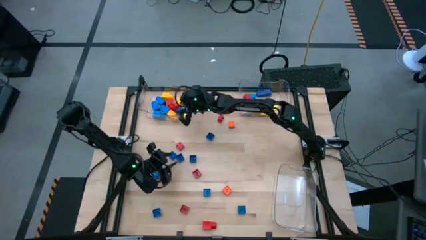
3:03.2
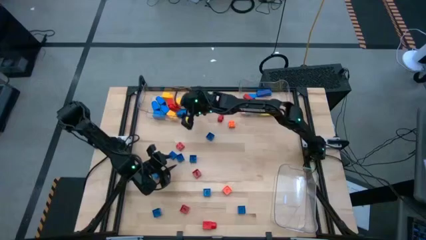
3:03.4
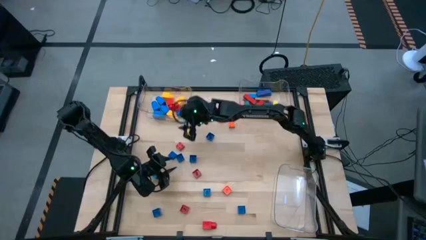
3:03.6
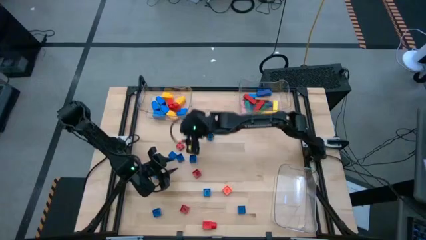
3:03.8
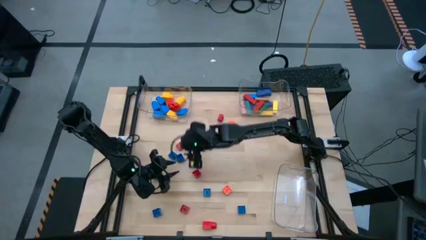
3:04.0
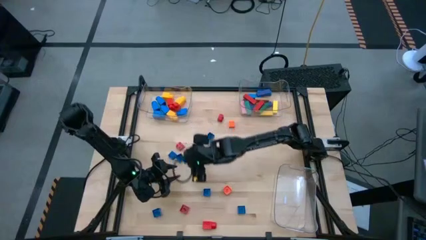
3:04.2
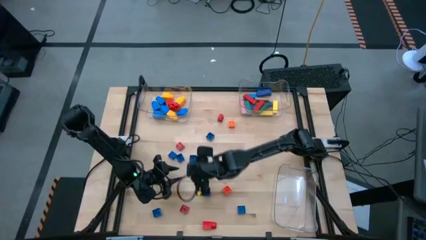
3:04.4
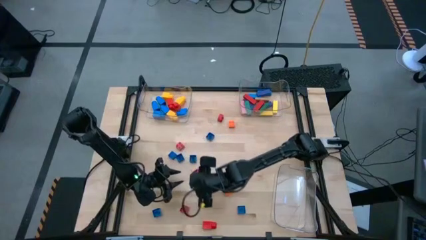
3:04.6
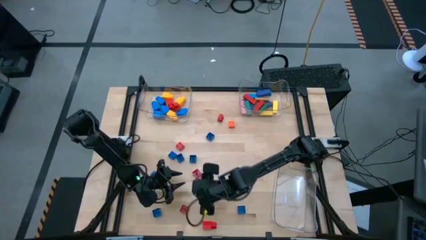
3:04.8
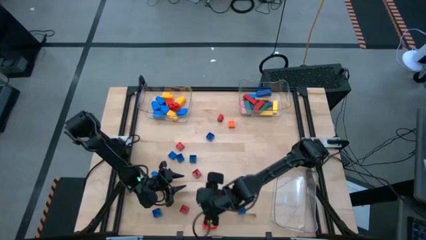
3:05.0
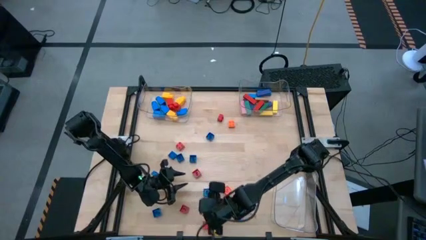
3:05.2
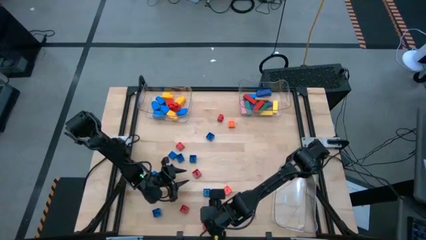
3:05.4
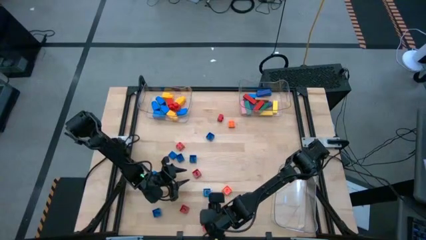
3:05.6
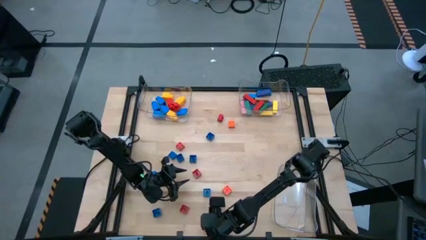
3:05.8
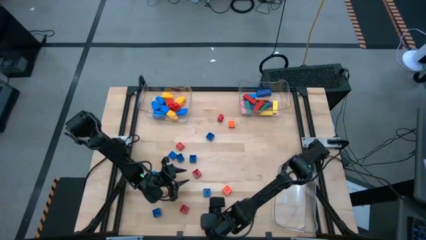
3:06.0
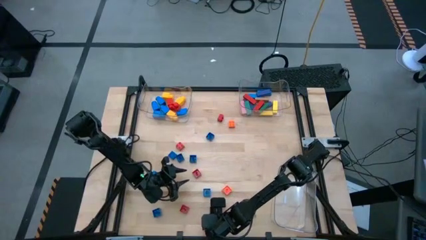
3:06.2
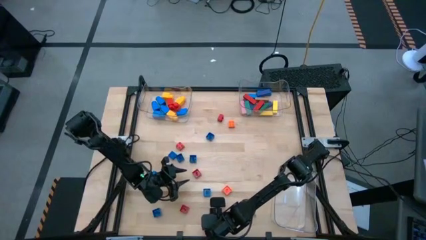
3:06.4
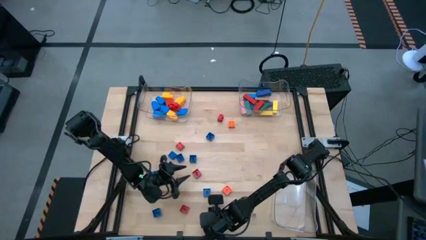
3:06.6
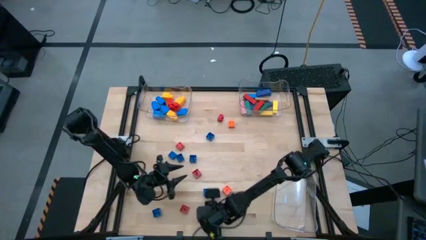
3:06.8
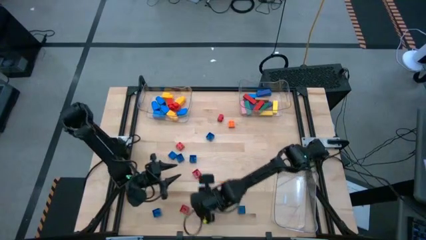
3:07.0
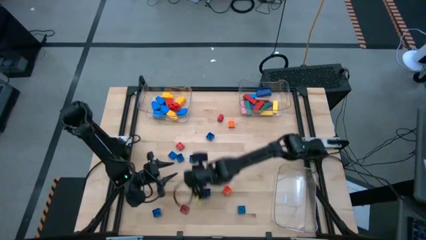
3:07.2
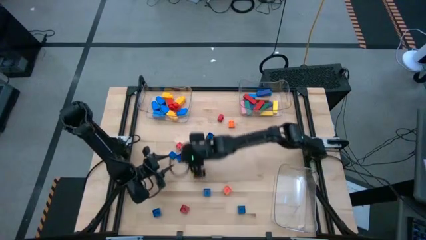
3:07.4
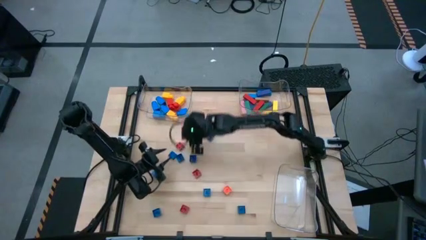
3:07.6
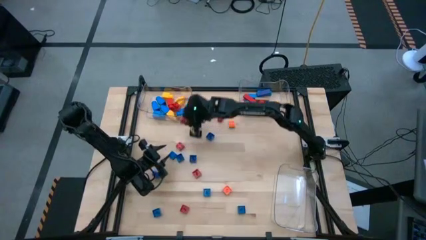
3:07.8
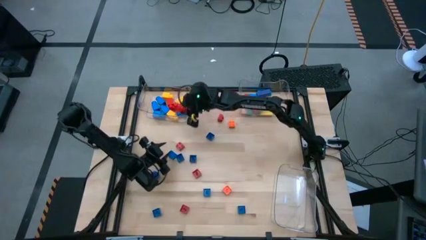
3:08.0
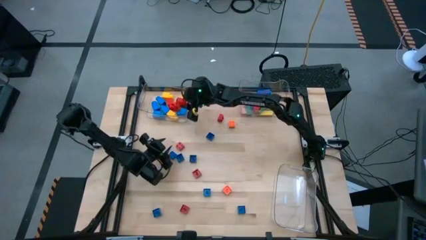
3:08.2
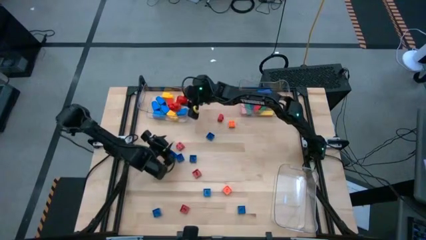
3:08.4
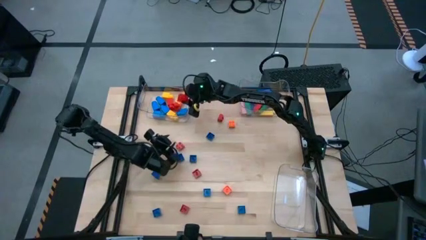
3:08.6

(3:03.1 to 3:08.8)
Task: Sort blocks by size
Put the 1 stud red game piece into the top left transparent bin

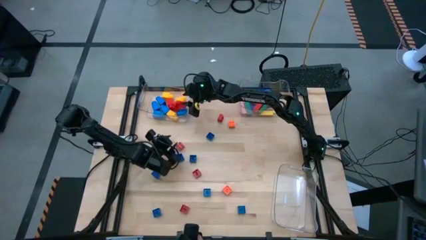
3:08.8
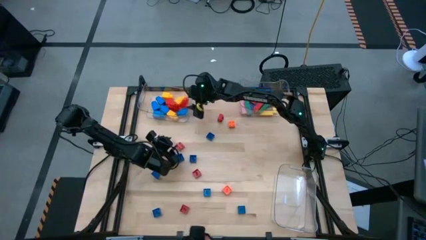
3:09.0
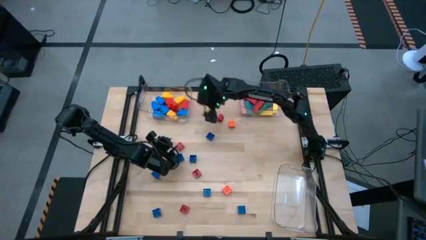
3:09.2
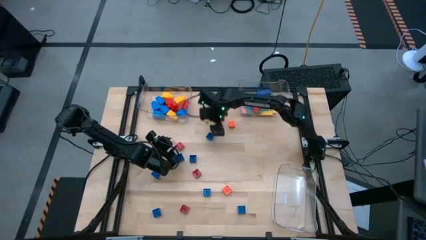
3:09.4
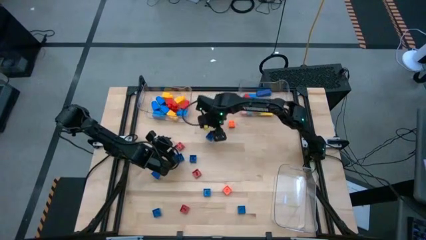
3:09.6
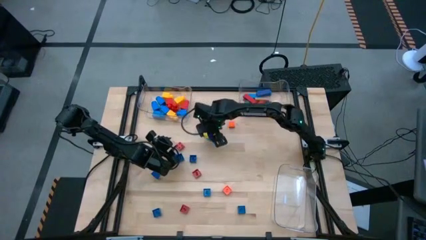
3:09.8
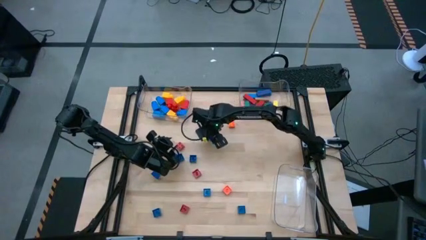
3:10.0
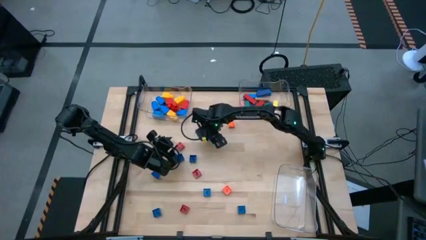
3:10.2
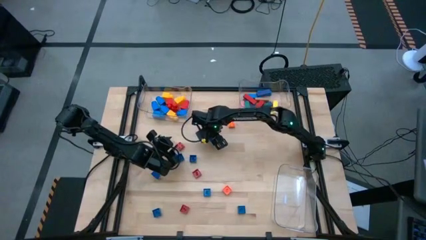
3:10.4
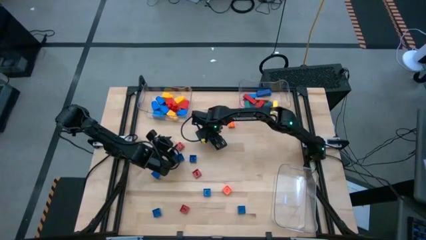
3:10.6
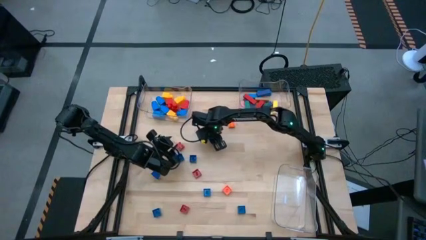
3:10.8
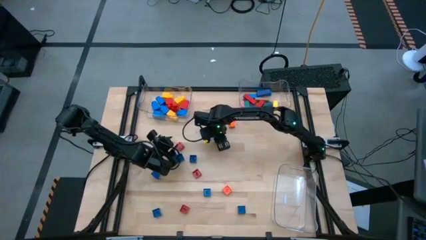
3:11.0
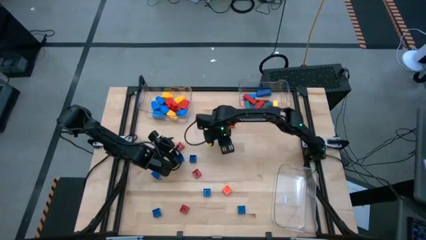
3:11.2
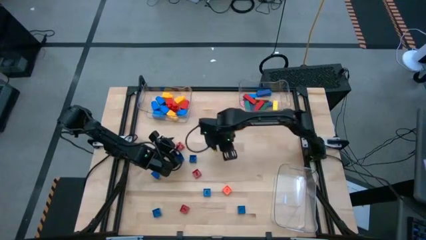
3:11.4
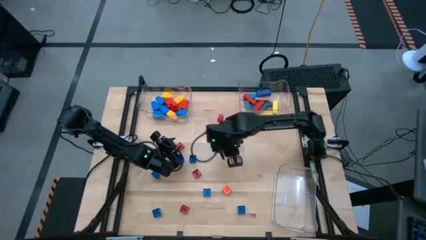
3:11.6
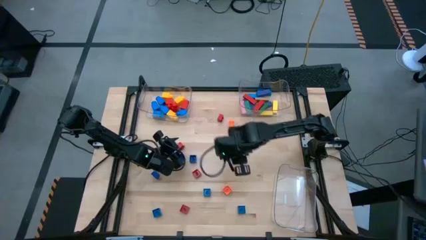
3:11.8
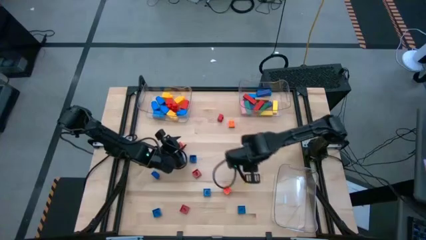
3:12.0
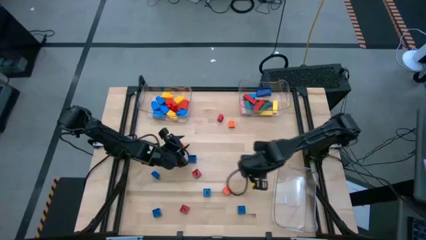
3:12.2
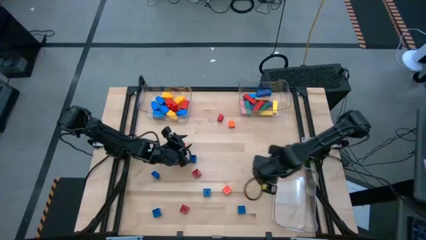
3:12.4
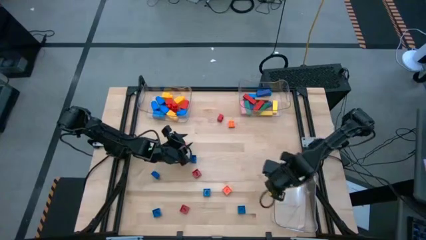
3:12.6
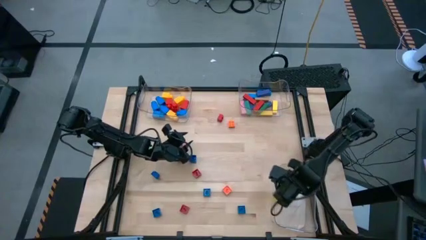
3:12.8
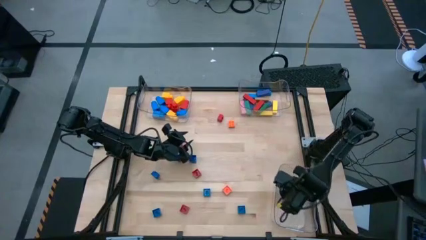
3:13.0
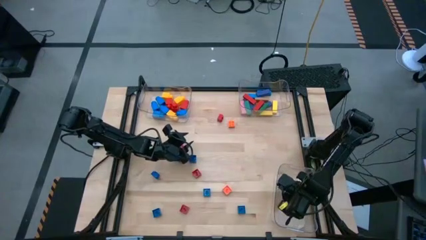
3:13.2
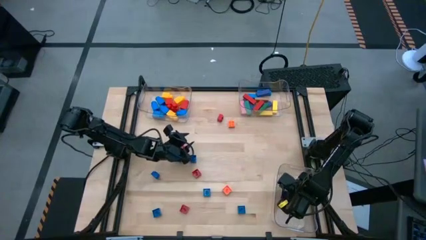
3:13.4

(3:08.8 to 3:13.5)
Put the 4 stud blue game piece into the bottom transparent bin

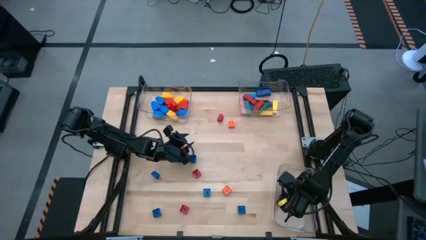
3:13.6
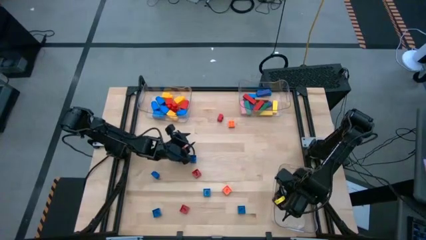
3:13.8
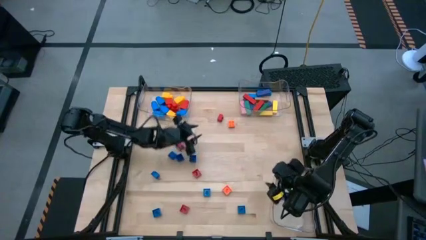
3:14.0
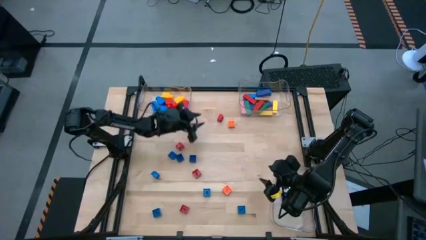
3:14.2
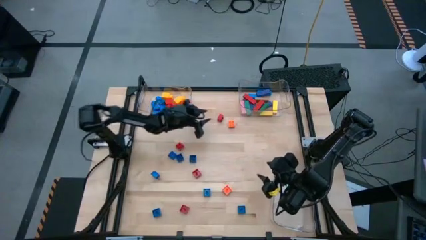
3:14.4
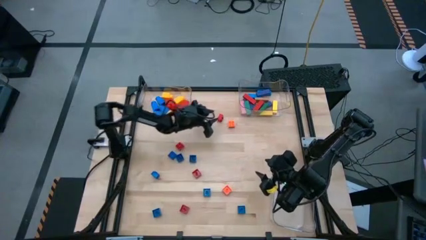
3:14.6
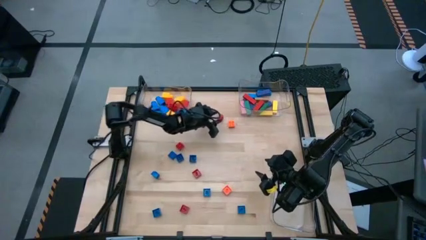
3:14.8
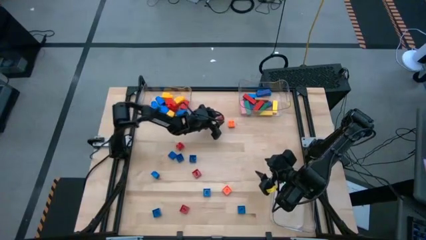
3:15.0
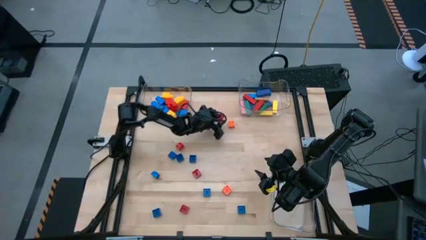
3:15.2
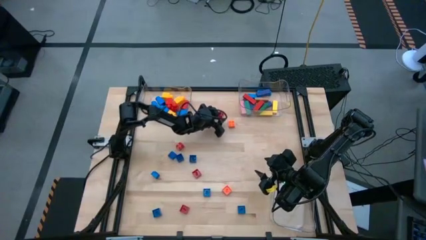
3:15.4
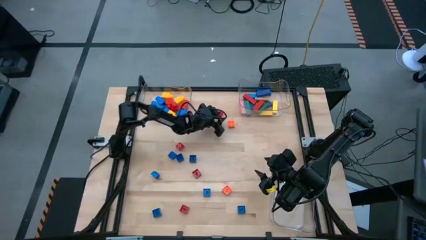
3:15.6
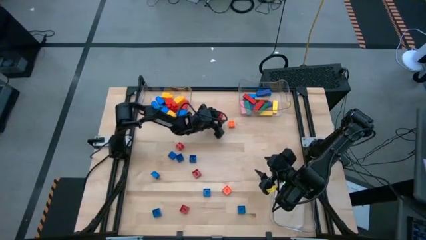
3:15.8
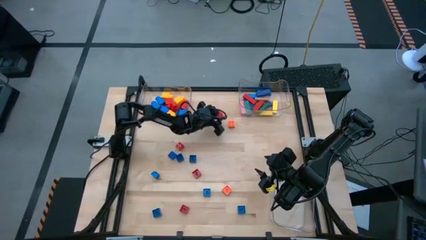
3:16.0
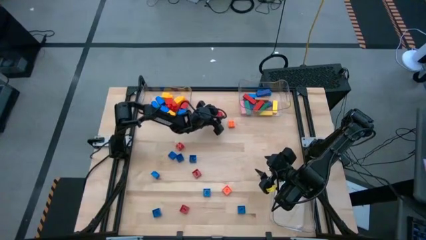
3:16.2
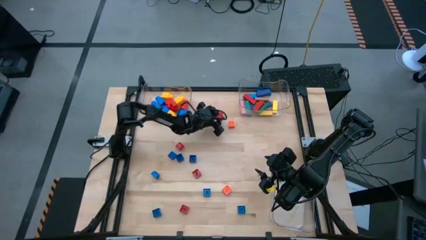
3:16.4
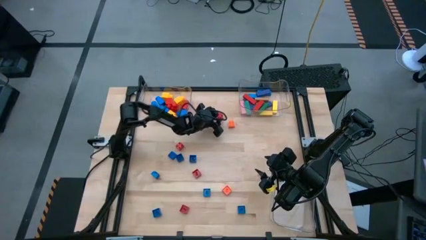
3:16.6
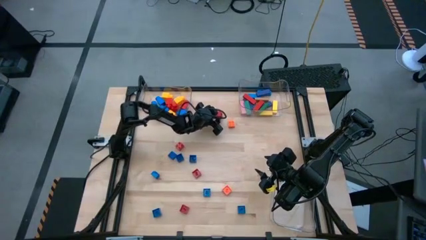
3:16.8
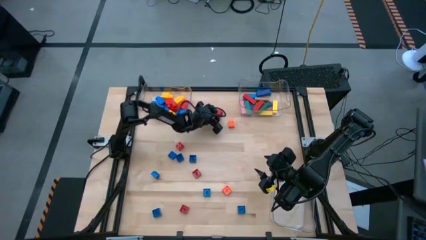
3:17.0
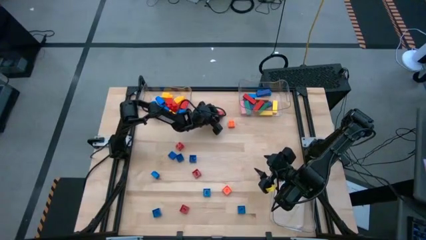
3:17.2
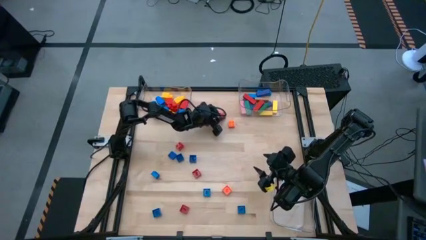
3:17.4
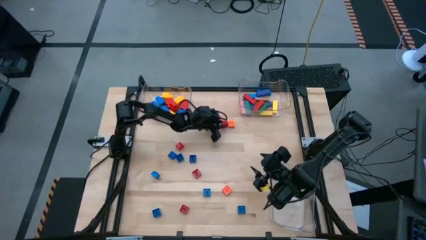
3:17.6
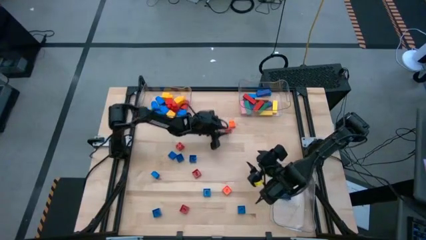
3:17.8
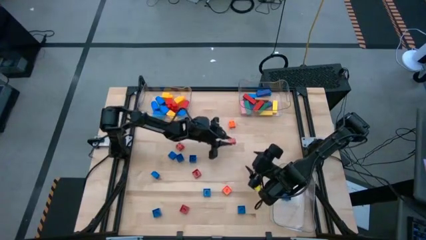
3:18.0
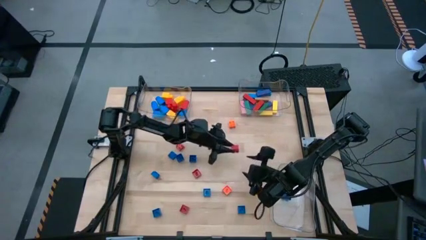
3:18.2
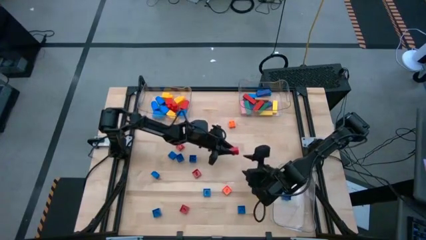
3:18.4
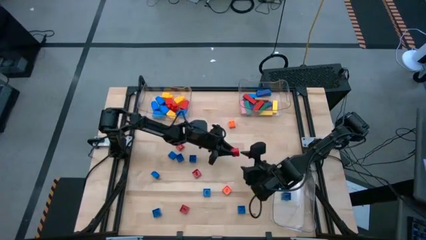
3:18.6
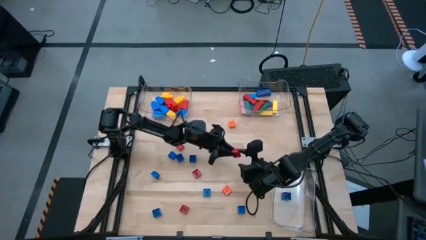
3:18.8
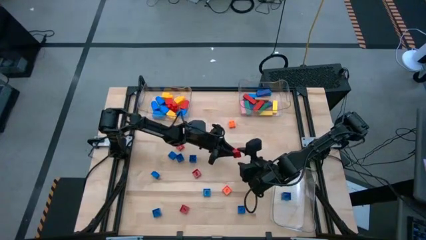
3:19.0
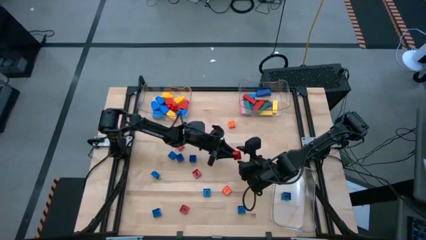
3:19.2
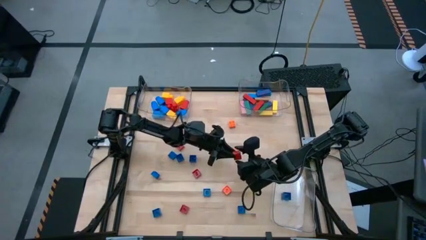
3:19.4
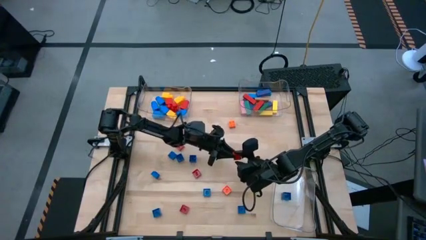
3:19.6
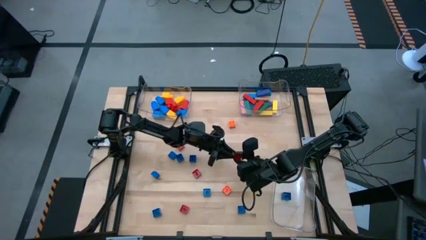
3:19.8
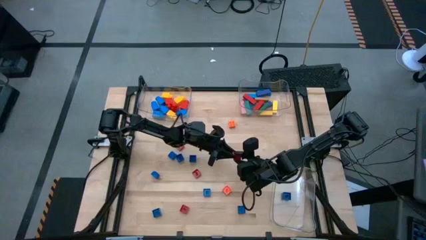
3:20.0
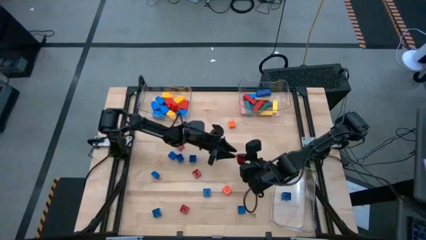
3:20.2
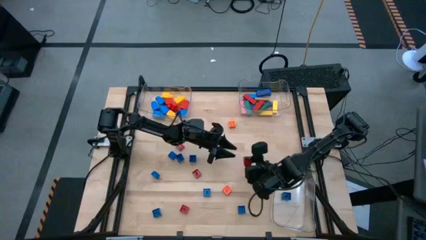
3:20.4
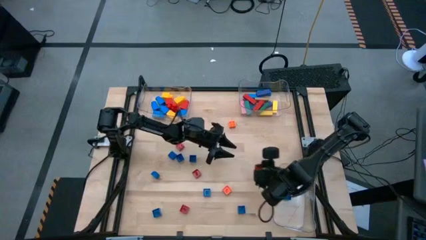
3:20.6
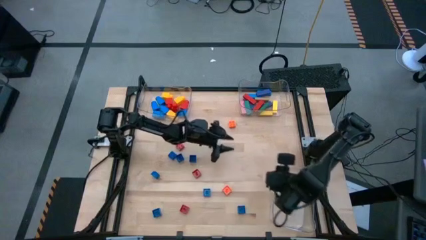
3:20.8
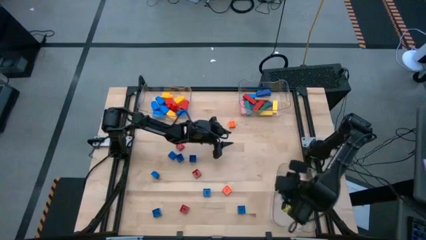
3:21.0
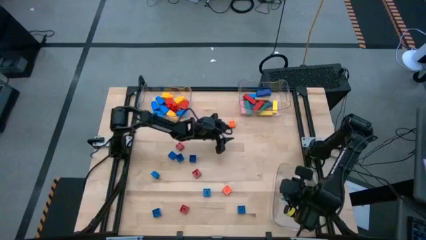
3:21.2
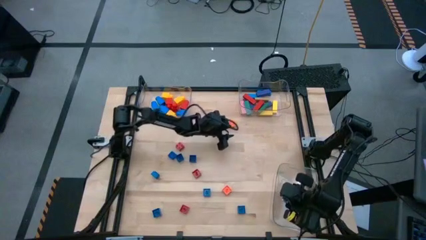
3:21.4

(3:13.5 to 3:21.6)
Put the 4 stud red game piece into the bottom transparent bin
